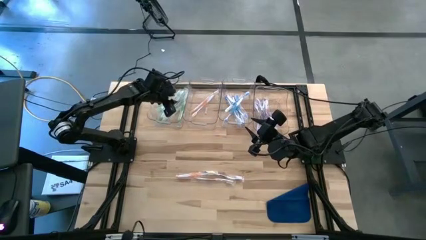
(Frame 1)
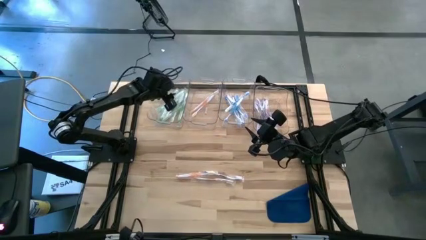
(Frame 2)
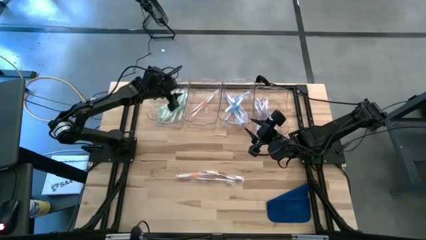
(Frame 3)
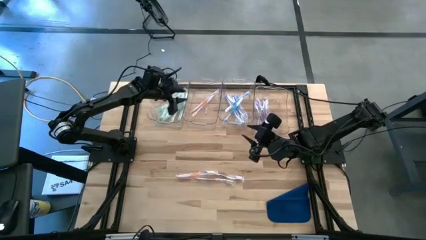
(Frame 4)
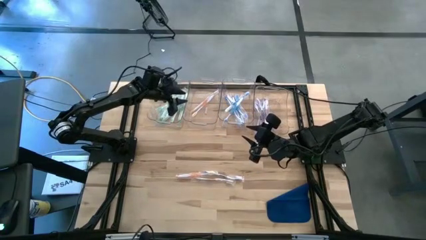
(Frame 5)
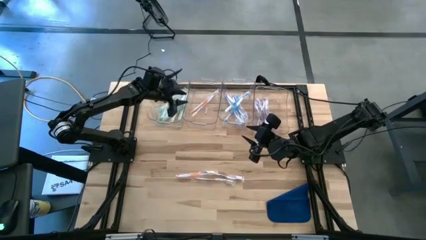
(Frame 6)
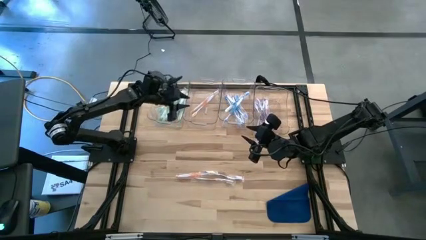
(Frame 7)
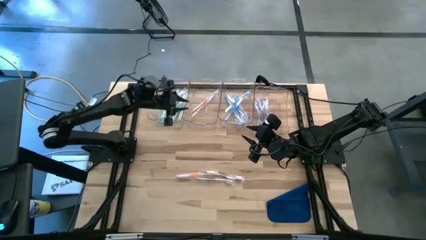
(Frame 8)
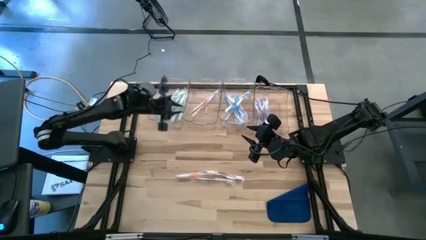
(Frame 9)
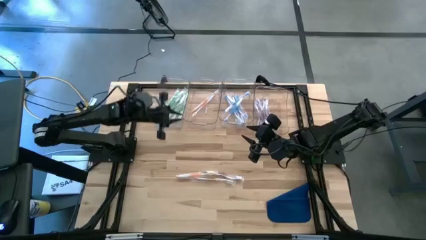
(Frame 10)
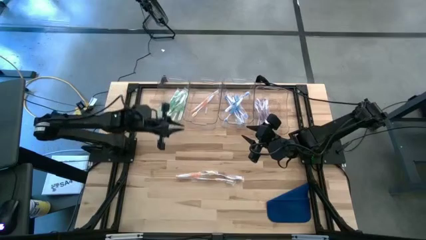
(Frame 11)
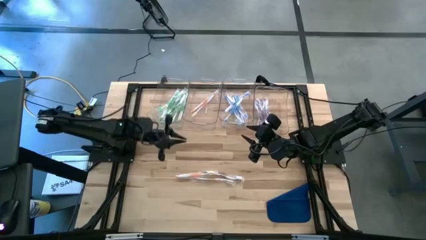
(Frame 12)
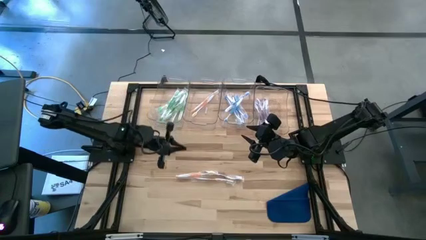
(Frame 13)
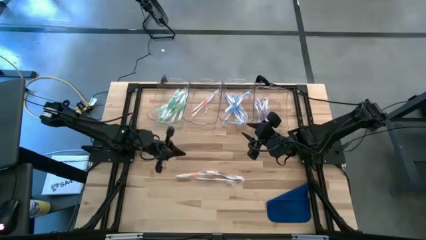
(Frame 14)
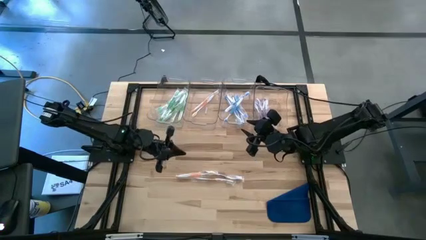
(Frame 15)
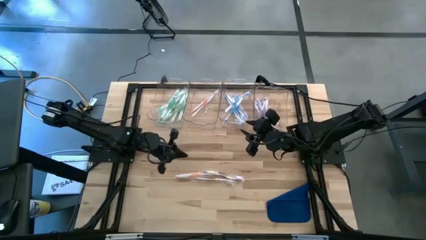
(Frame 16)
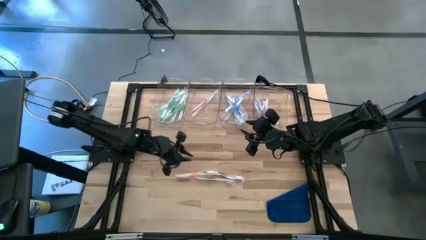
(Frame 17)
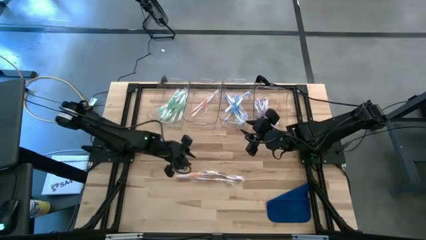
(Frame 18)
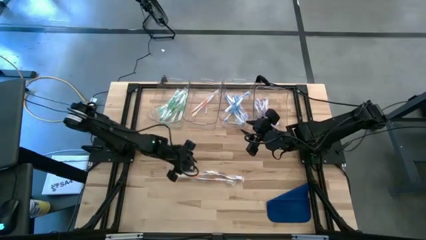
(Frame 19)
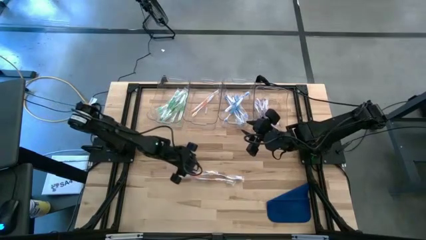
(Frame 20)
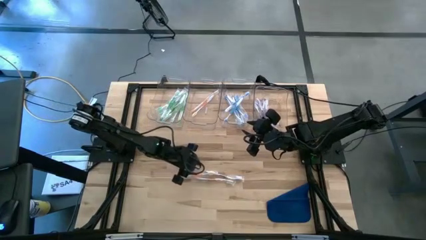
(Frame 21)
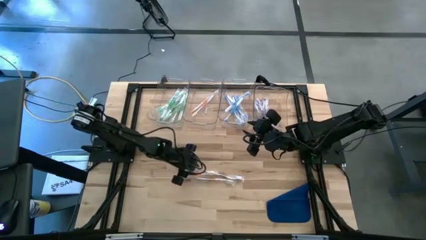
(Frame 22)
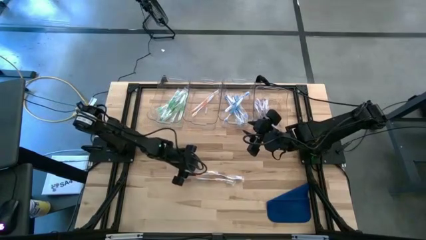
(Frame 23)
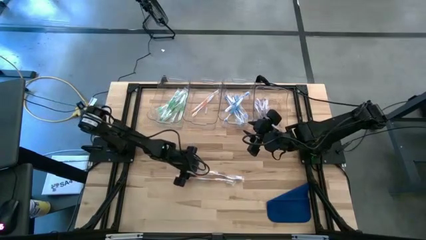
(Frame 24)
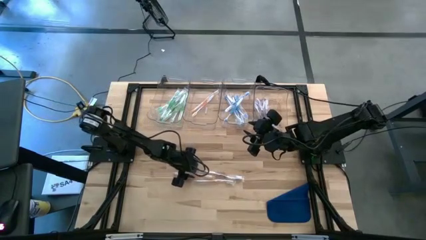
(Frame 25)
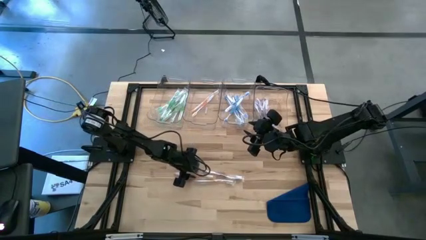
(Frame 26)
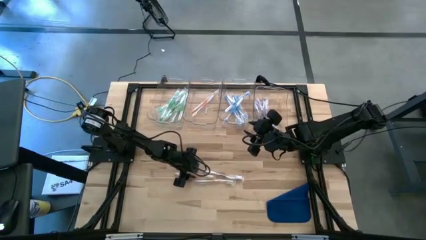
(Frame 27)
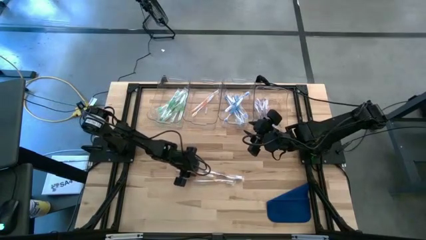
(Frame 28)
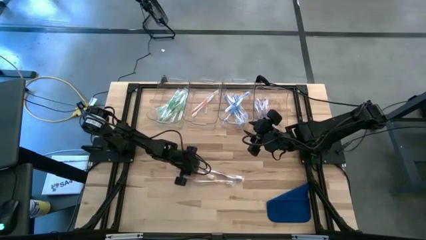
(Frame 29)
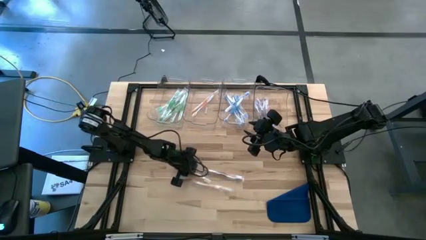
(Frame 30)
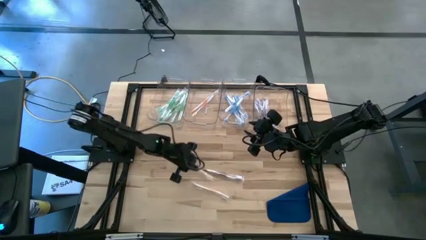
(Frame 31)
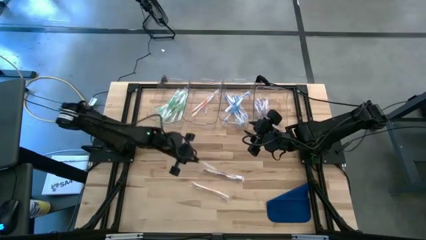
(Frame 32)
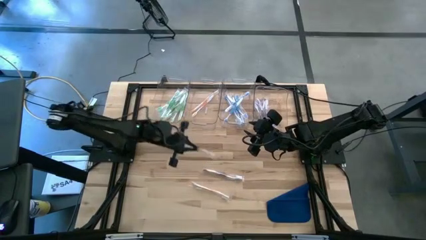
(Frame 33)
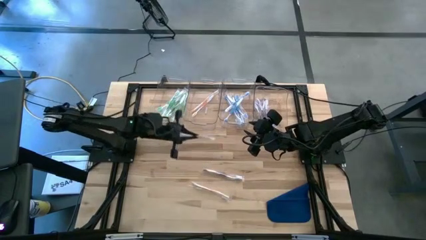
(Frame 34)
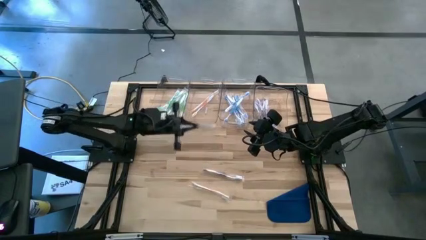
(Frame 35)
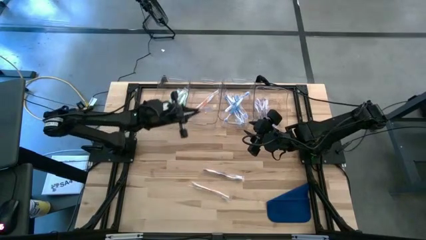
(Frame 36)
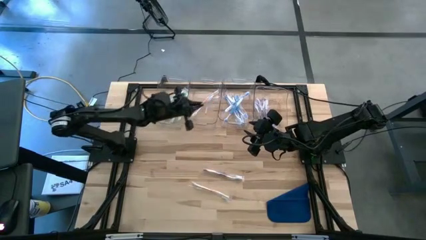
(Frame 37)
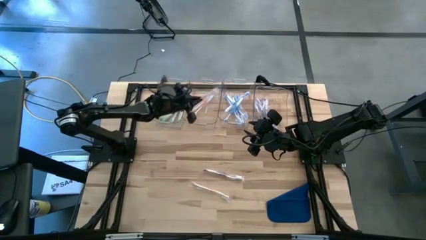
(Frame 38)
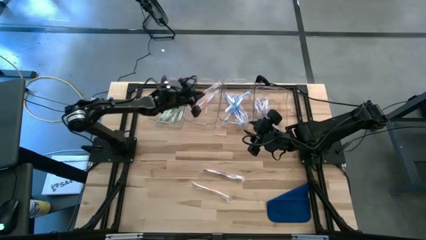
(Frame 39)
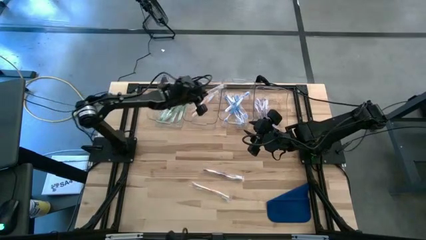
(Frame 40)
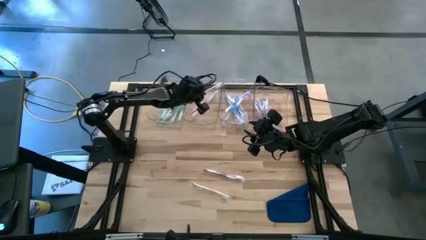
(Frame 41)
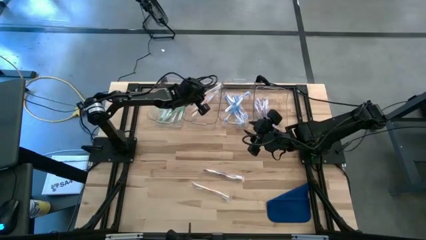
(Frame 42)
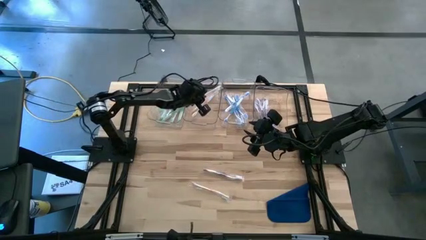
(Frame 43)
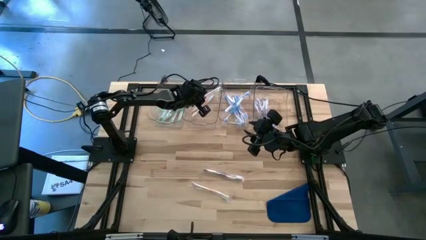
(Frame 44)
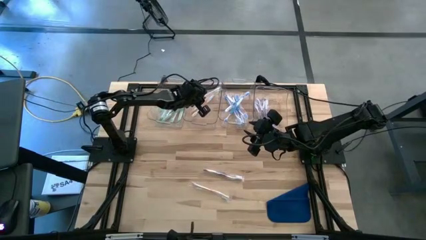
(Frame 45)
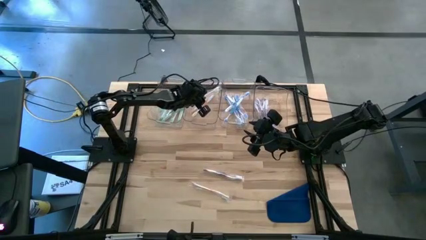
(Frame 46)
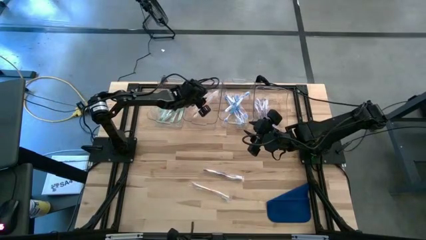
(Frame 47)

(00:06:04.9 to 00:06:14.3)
Task: Pick & Place Toothbrushes
Put the orange toothbrush into the middle left transparent bin

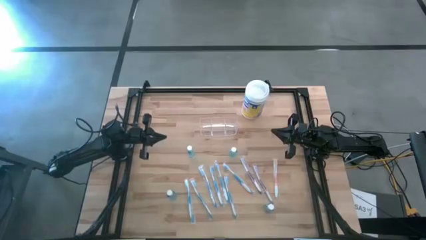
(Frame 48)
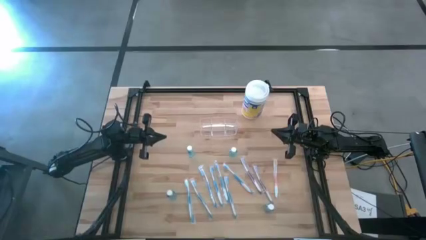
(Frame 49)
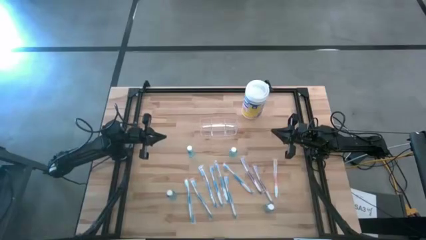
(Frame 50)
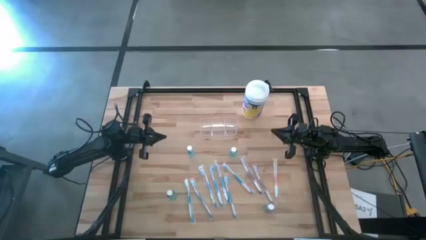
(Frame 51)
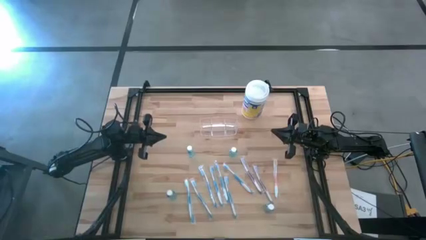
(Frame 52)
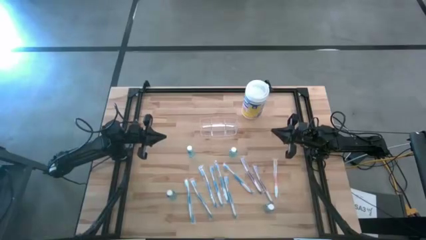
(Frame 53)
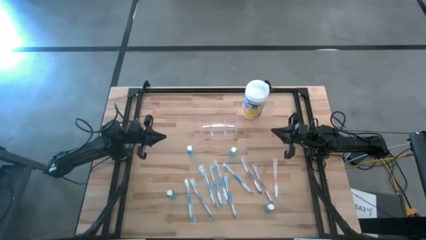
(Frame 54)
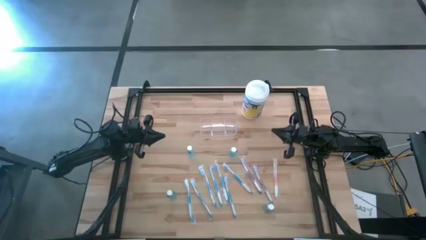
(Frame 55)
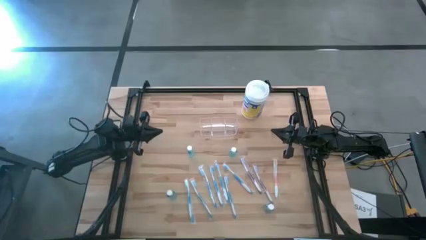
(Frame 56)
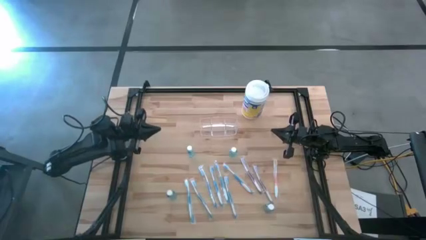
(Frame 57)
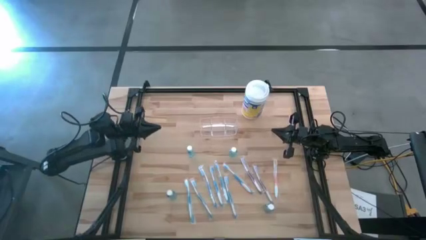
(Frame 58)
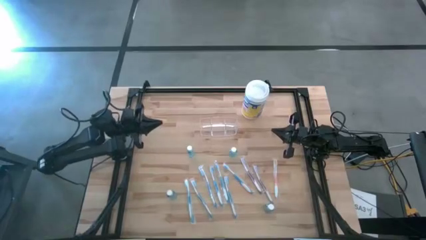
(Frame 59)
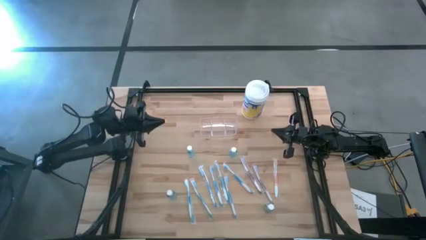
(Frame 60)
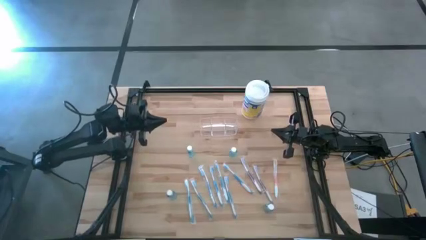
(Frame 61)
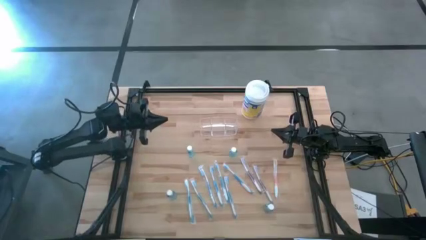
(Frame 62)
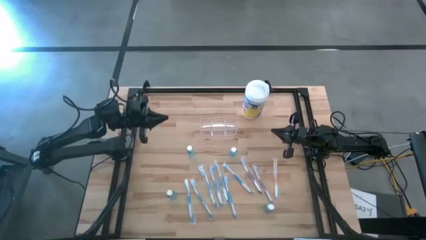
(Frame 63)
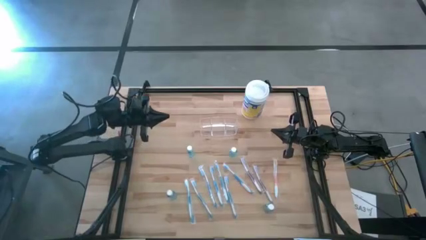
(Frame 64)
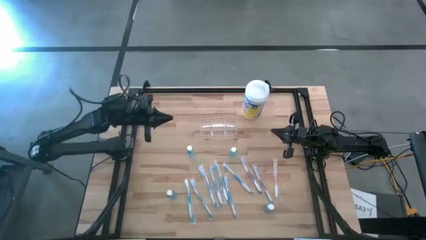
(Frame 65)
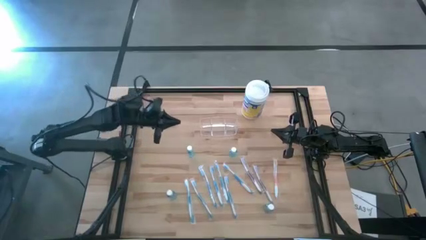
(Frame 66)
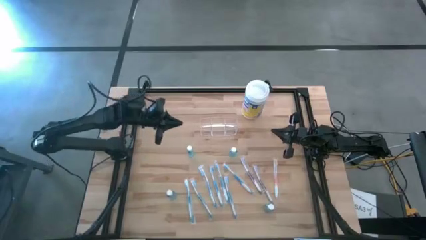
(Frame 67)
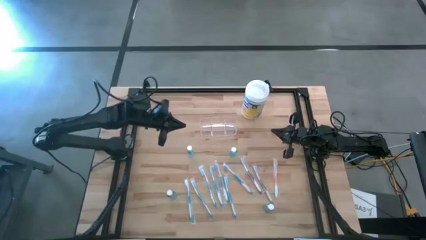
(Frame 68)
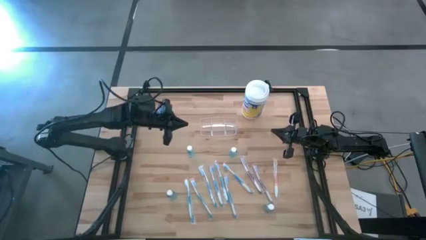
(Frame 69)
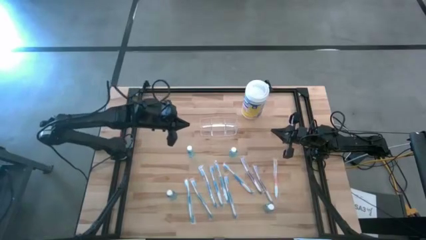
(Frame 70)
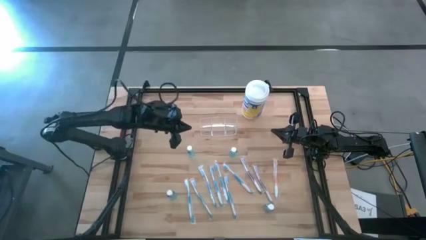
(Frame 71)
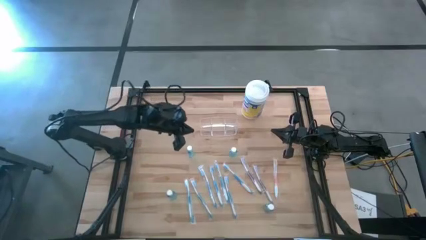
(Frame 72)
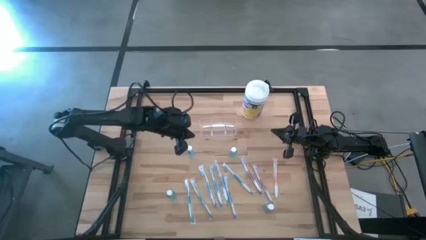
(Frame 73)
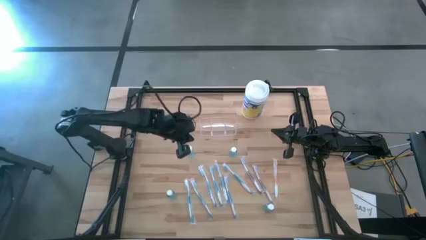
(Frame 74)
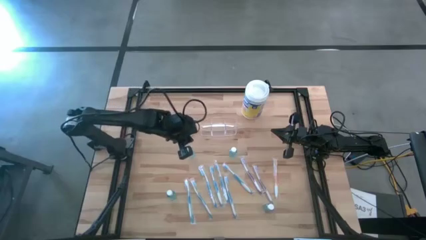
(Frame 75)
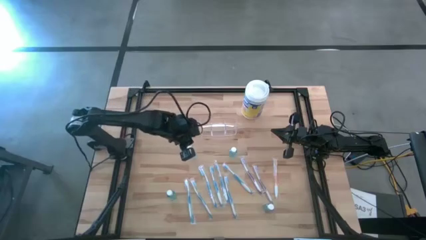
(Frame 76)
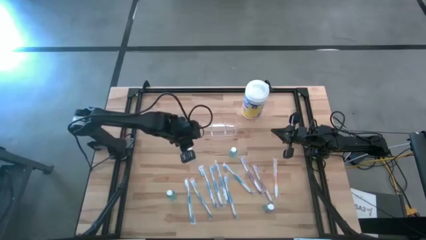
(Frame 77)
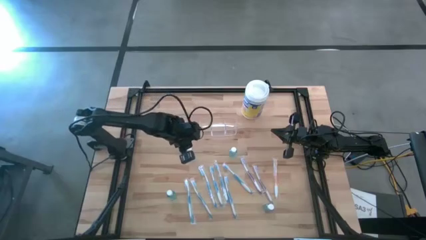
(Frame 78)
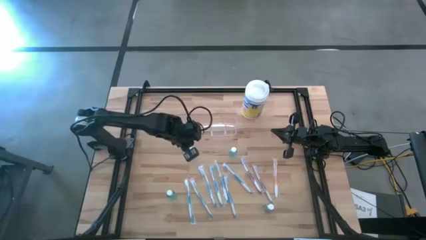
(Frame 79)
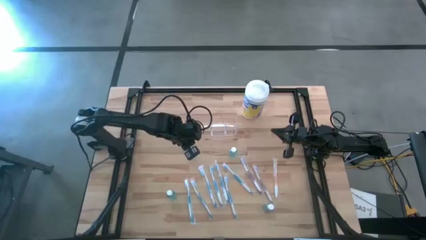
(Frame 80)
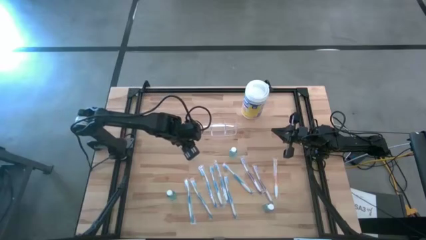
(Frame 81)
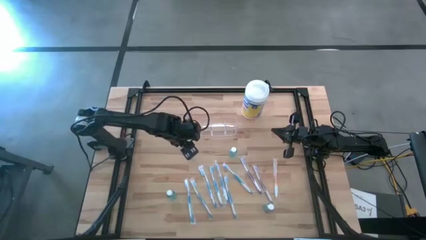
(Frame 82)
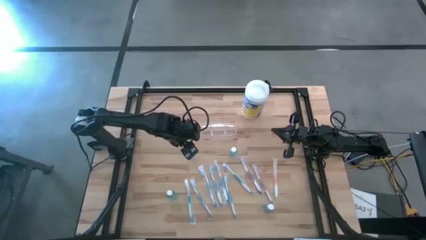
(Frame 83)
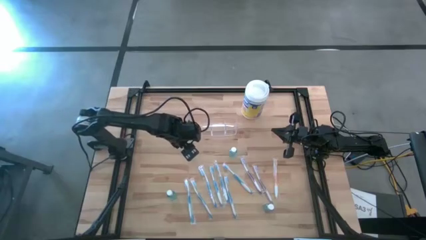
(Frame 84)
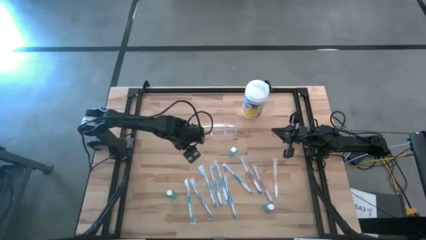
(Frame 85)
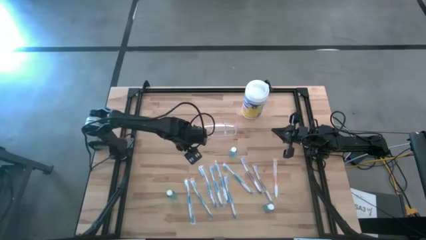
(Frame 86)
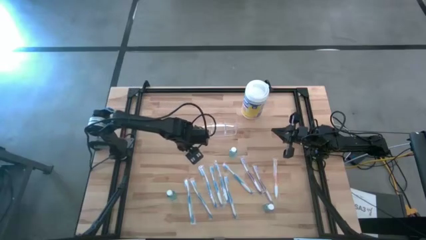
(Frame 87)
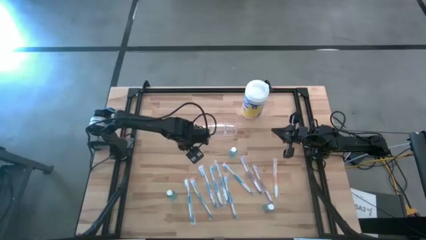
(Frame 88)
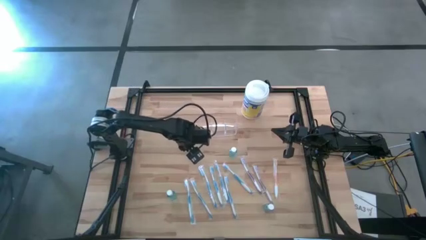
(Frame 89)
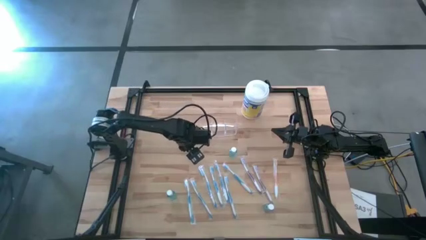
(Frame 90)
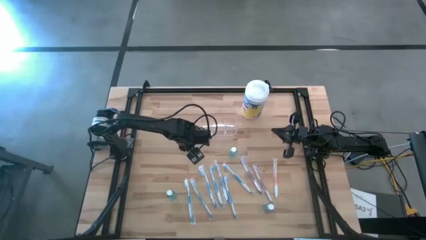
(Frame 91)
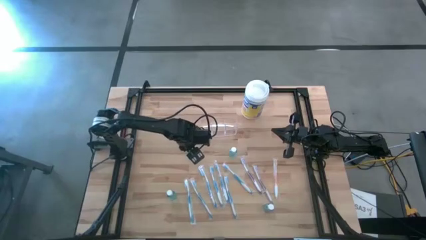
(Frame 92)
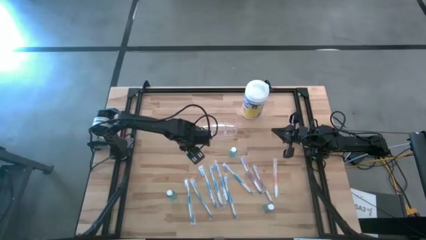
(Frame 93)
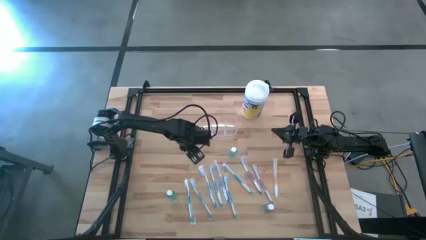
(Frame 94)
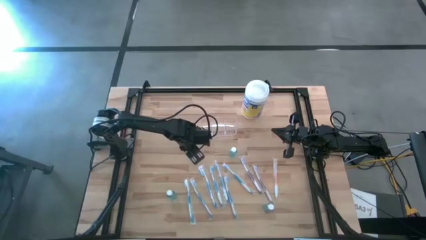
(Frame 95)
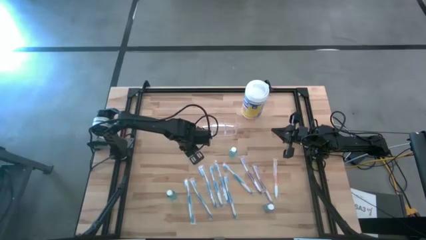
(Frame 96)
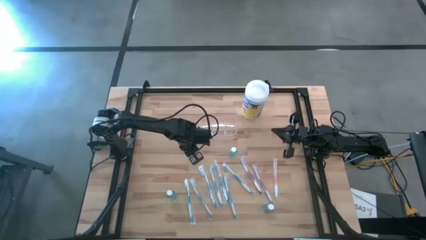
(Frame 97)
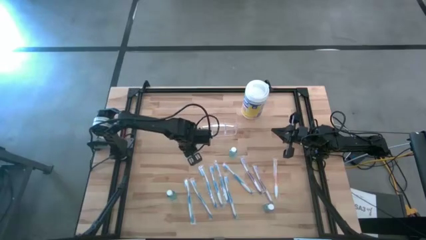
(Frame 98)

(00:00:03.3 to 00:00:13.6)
Task: Pick & Place toothbrushing station
Put the blue mouthwash bottle into the transparent organizer
